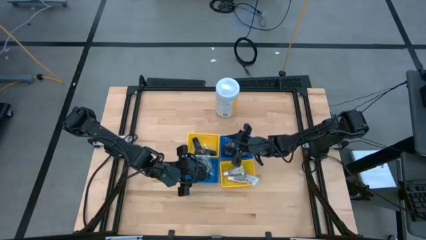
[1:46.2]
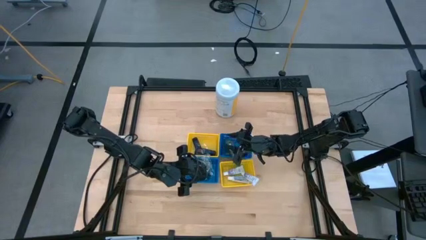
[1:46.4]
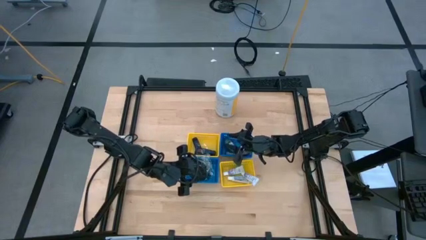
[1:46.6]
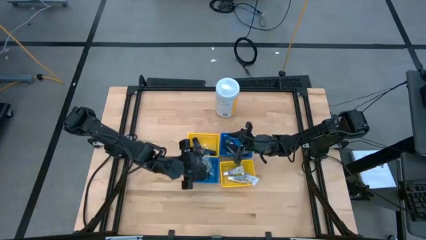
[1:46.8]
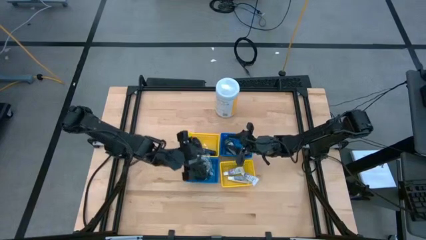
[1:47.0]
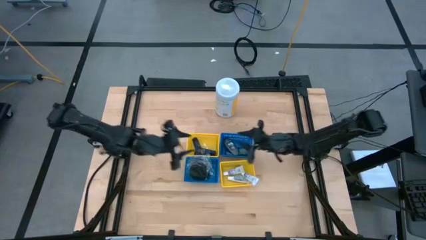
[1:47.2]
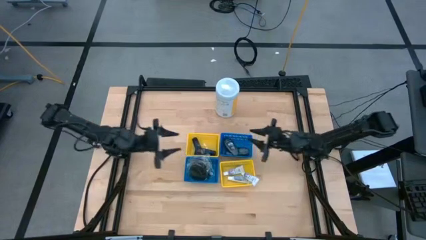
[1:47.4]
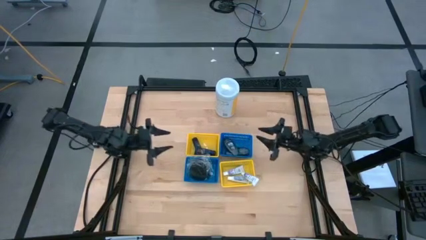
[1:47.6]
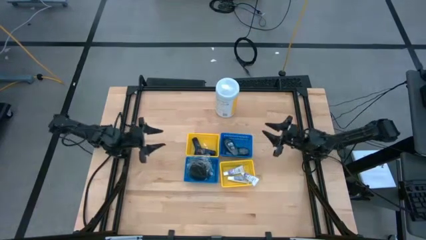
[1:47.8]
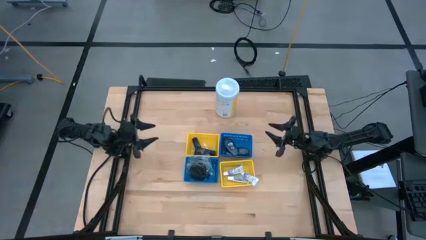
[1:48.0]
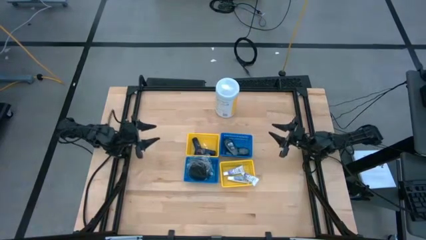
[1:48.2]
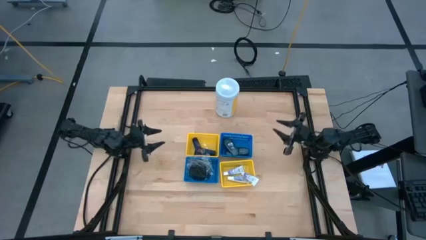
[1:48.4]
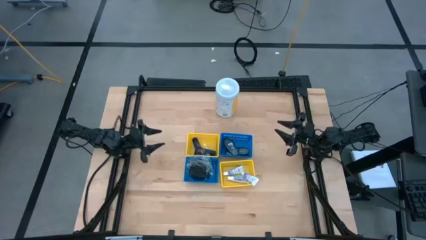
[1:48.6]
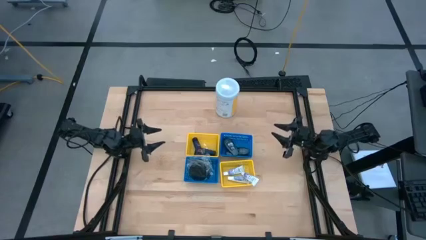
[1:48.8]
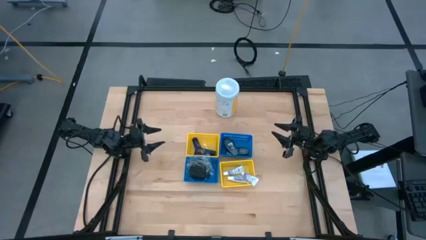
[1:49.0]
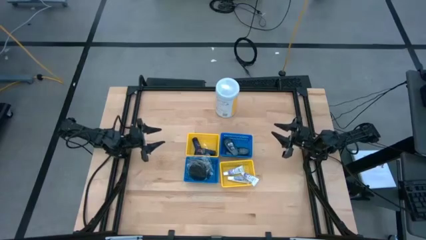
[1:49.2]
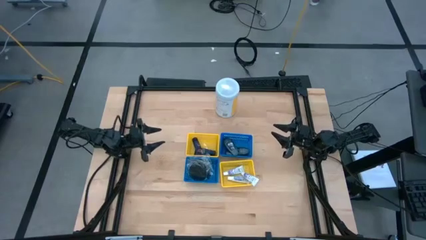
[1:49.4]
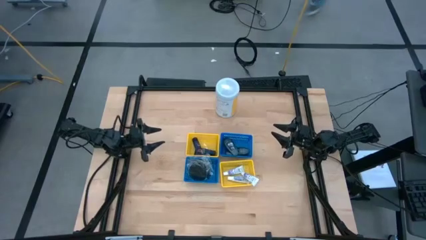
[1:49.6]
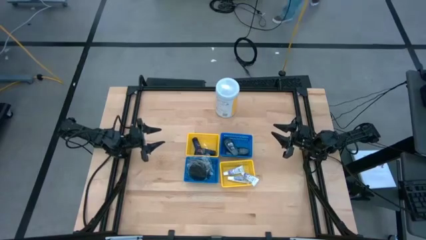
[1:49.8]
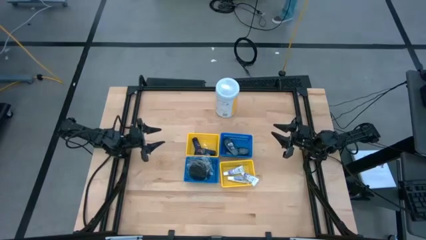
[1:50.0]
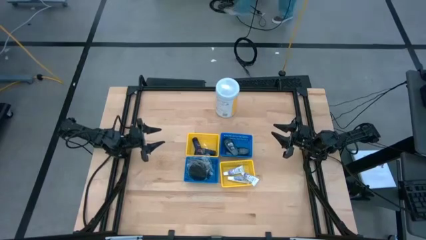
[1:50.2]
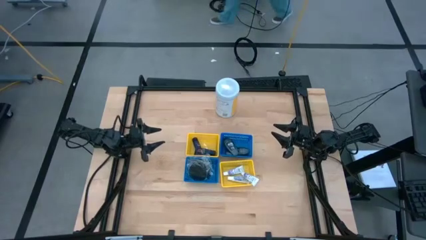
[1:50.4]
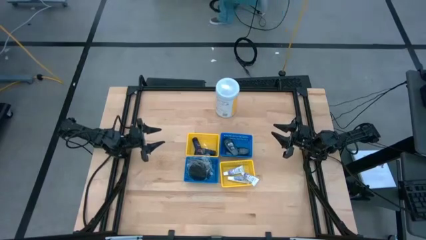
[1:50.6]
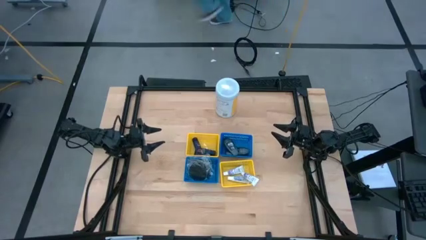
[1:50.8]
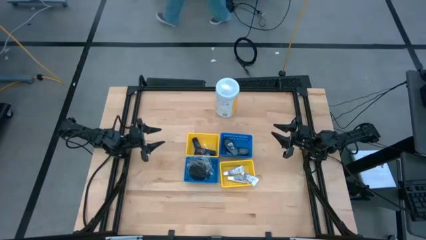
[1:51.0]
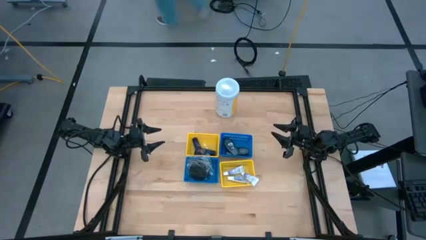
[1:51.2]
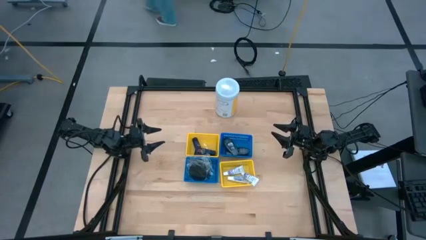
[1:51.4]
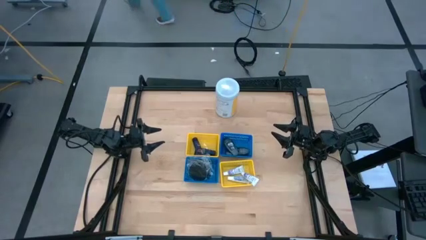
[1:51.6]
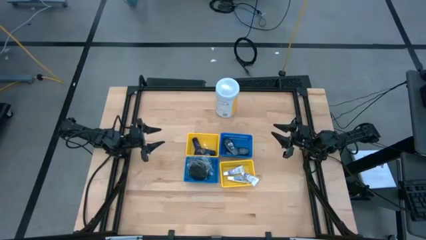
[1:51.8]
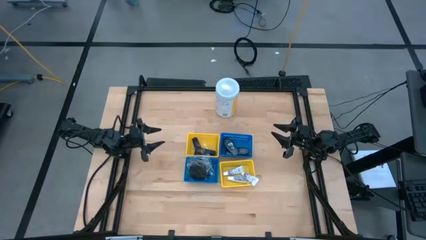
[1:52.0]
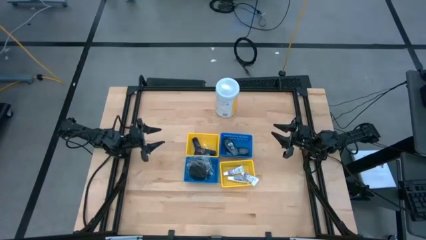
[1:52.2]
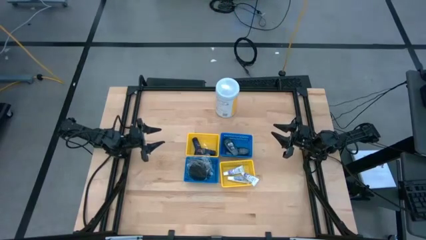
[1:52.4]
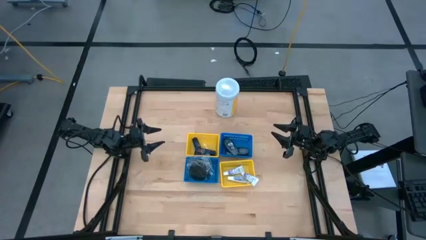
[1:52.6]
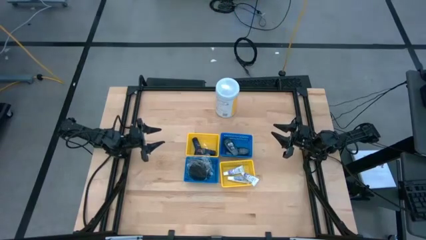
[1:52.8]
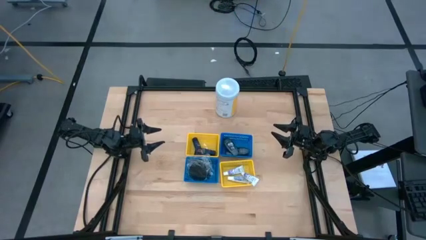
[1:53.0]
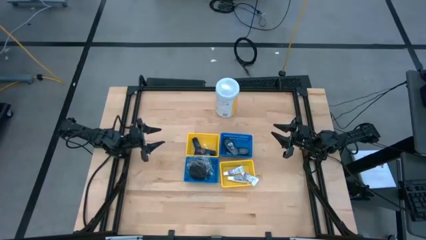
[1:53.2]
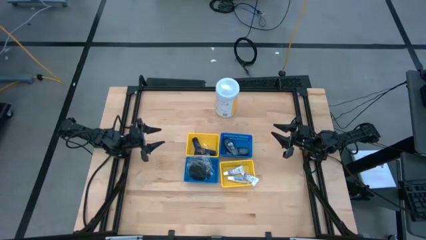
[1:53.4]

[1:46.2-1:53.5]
Task: Pick & Place Travel size toiletries
Return to Home Position

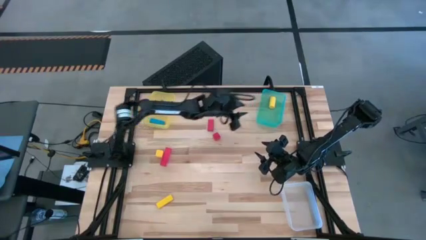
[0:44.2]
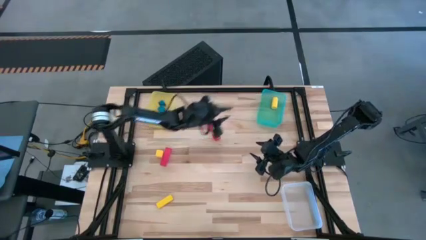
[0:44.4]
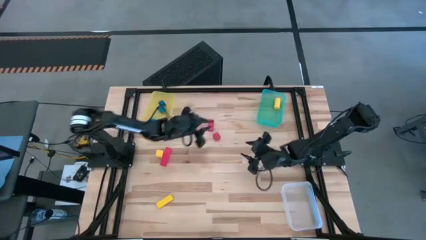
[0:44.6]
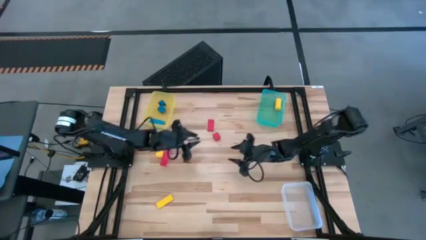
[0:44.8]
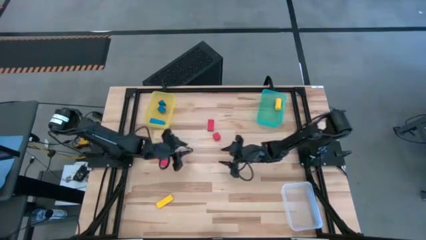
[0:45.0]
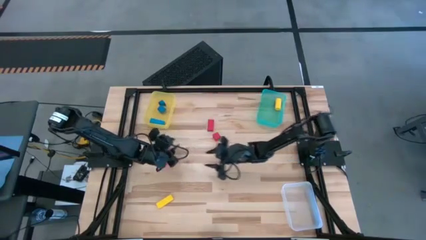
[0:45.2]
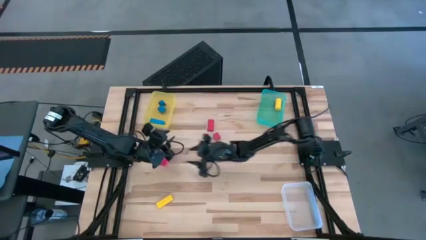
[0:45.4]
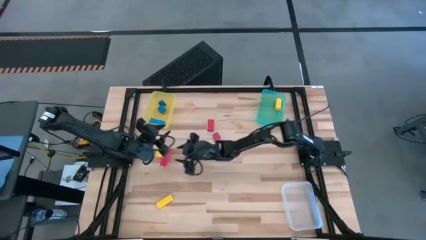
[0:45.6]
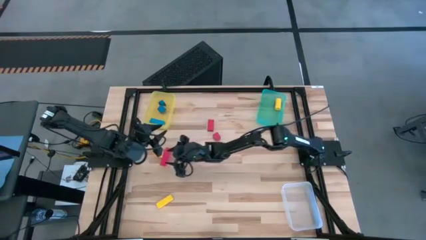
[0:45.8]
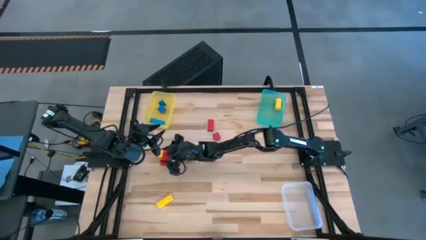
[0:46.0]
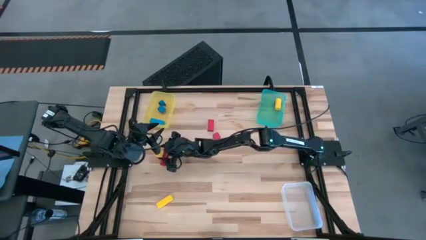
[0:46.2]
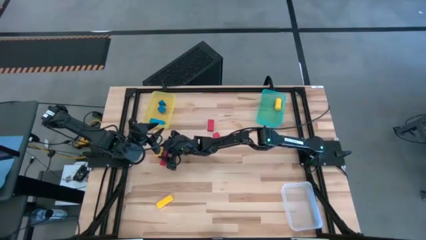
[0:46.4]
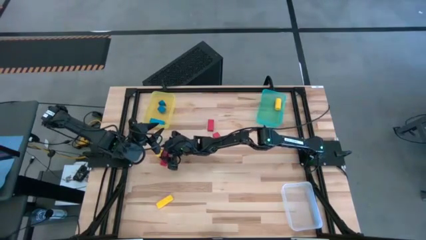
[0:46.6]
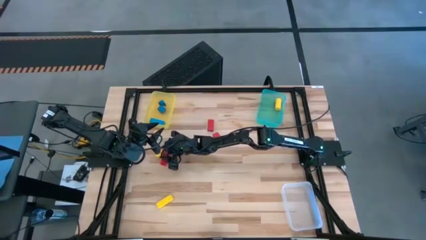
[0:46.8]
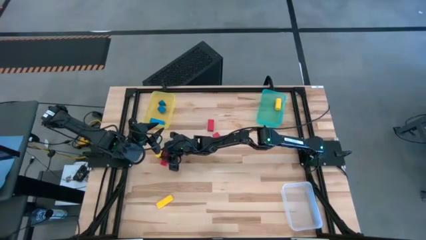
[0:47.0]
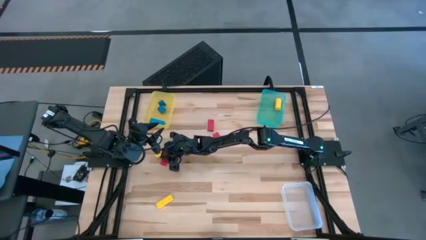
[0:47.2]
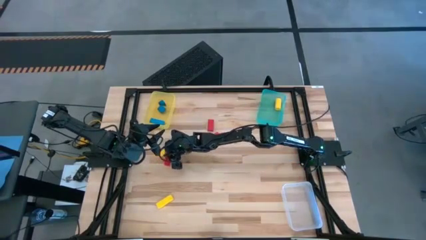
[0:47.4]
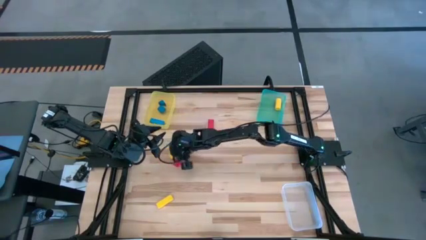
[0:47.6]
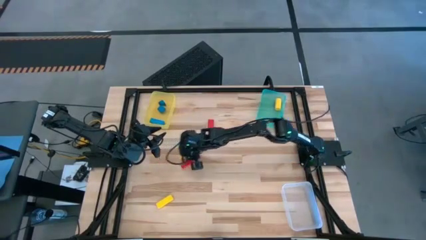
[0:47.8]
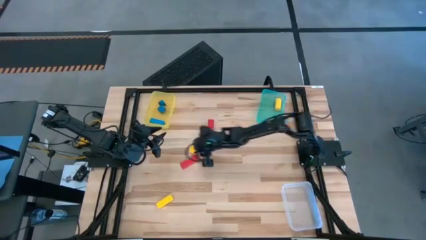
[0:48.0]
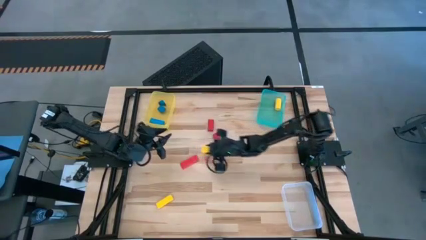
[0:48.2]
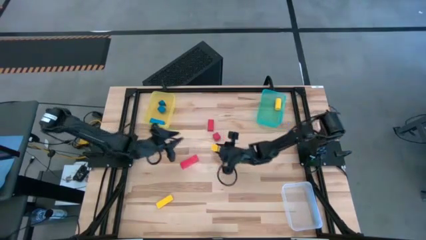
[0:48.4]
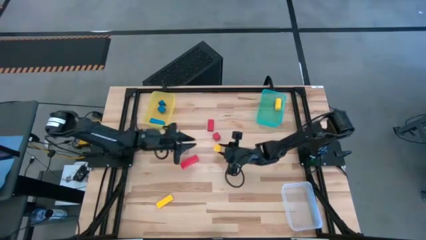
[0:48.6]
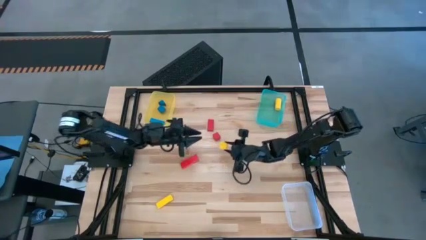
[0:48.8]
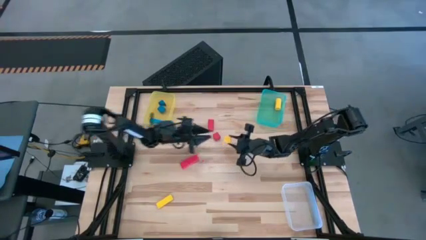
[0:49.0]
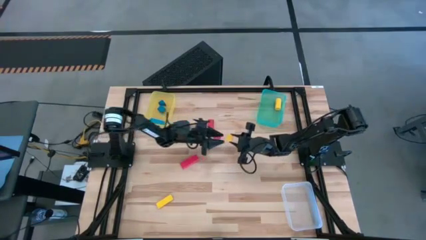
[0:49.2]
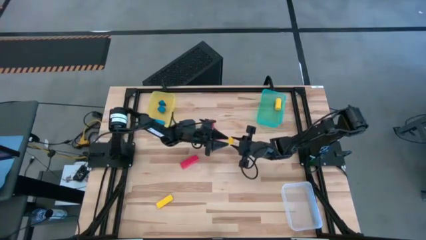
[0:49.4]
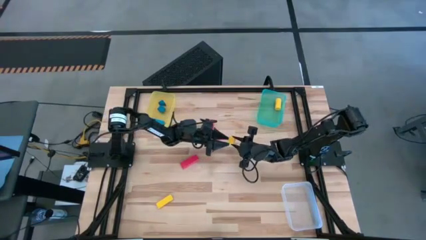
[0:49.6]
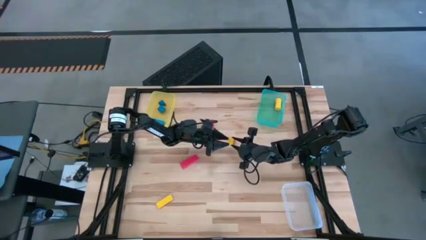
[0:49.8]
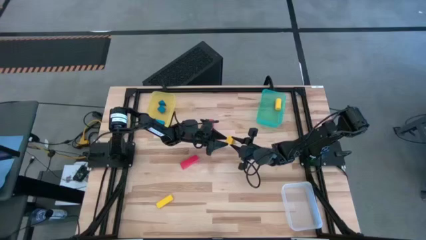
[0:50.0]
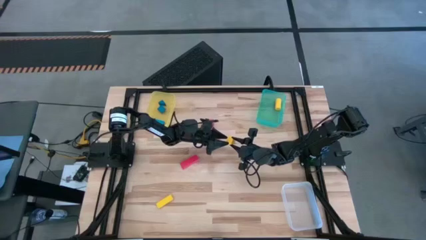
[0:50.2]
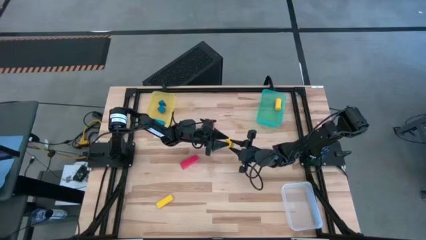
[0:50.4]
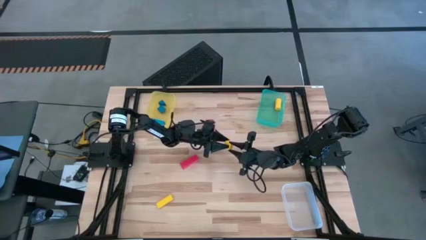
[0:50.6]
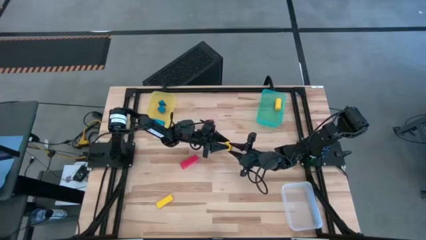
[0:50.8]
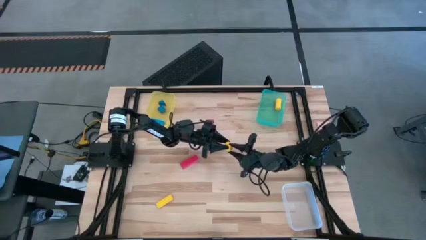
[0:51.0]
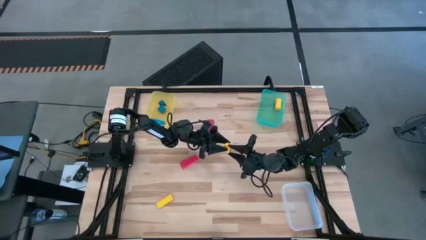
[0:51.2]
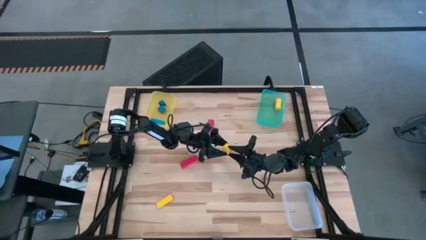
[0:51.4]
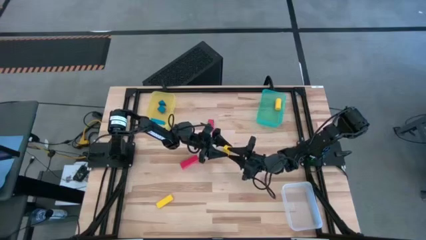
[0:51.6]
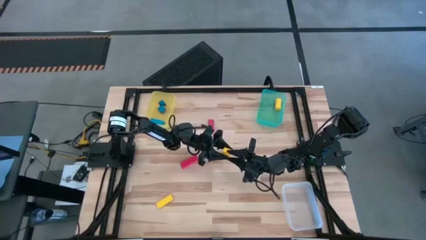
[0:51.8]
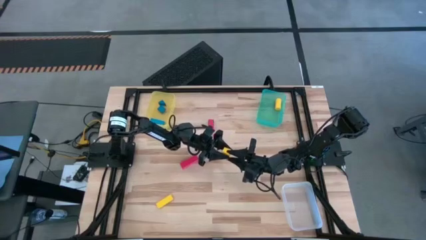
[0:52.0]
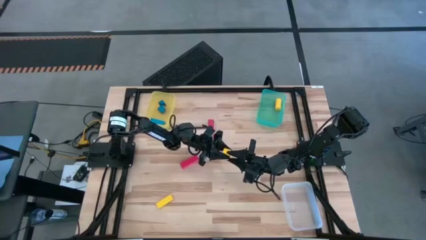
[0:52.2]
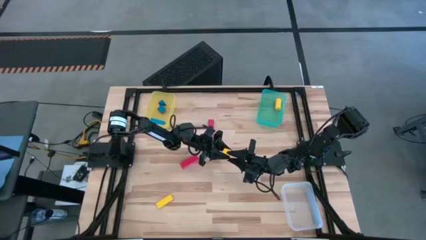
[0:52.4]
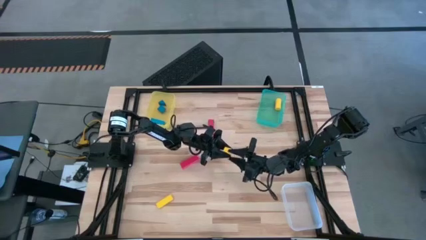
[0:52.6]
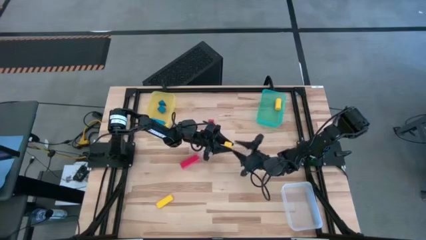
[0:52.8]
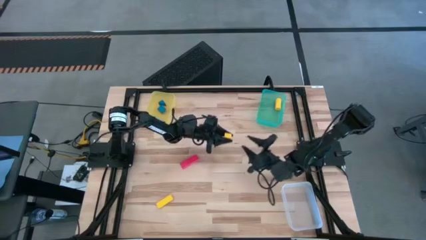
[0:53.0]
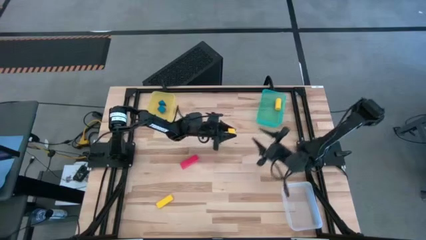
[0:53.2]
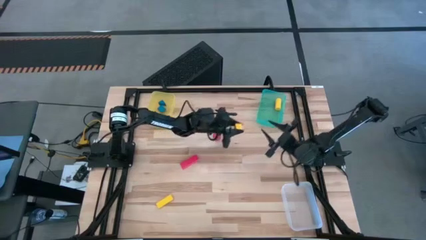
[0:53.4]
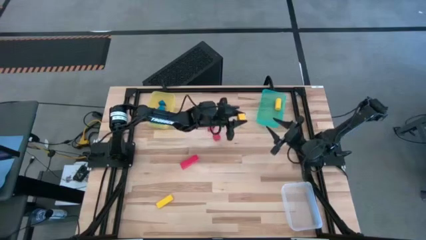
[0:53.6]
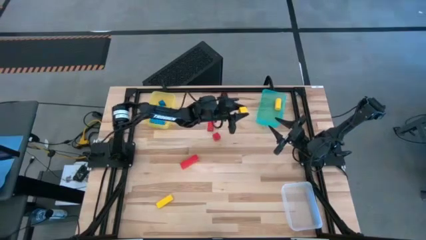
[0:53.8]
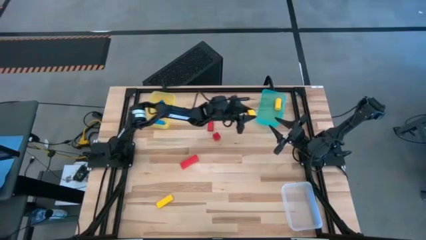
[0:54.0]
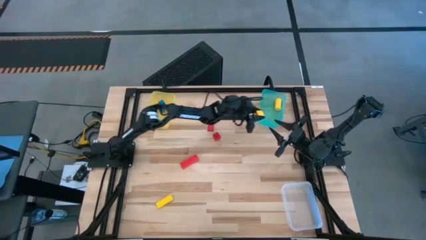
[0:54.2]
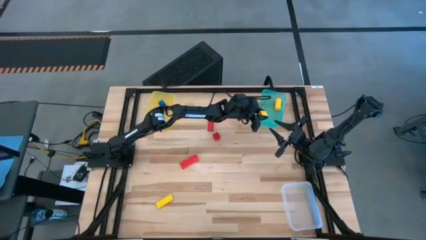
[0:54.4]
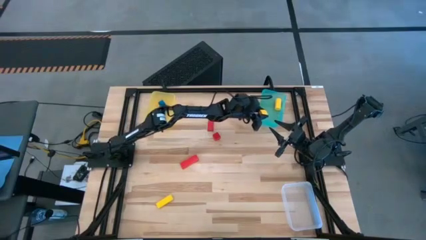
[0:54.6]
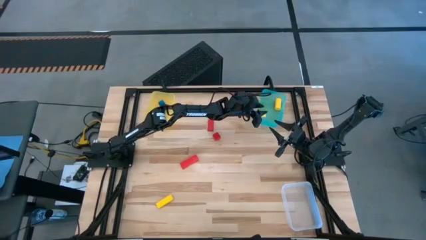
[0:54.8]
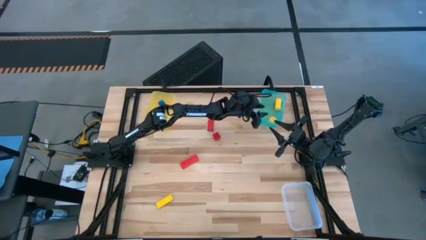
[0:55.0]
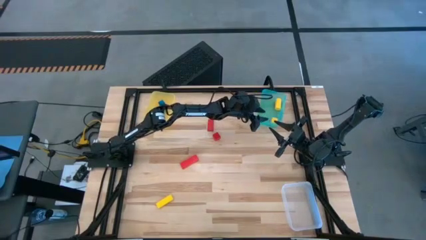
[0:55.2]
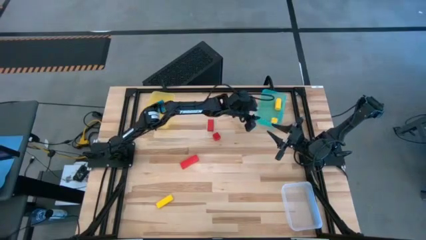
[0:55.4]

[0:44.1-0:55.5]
Task: Sort & place blocks by color
Put the yellow square block into the light blue bin
